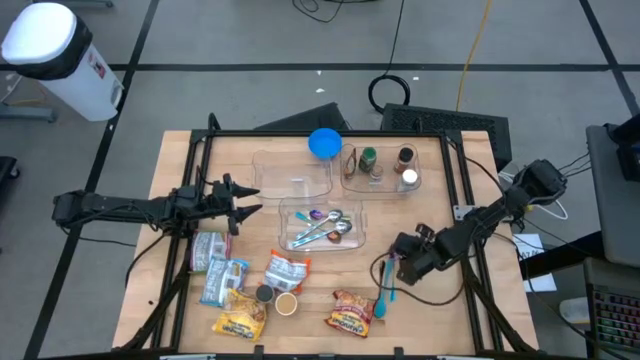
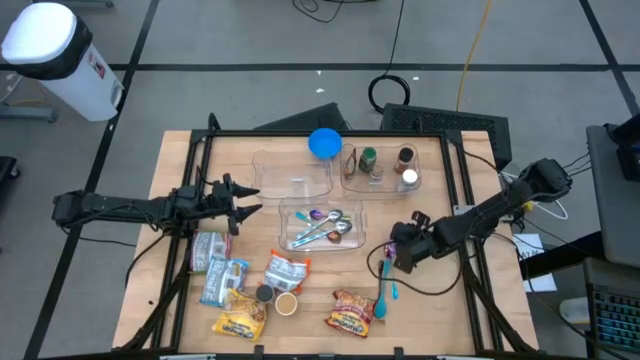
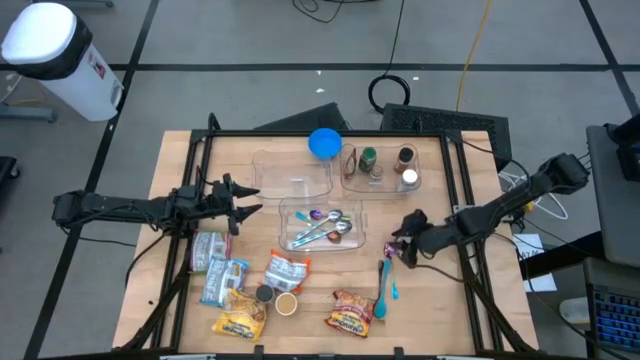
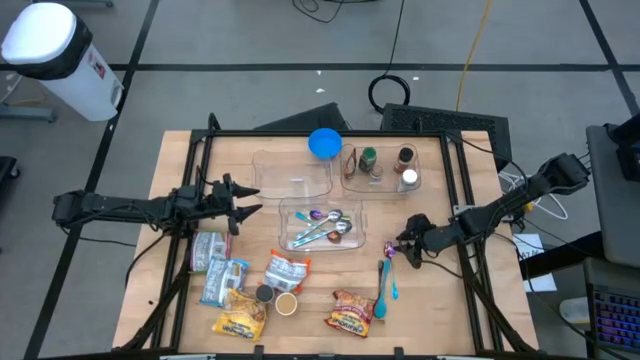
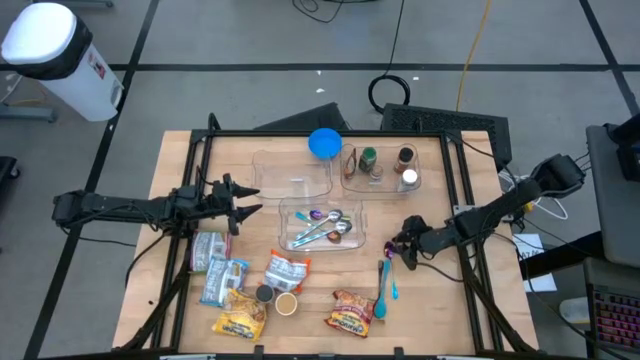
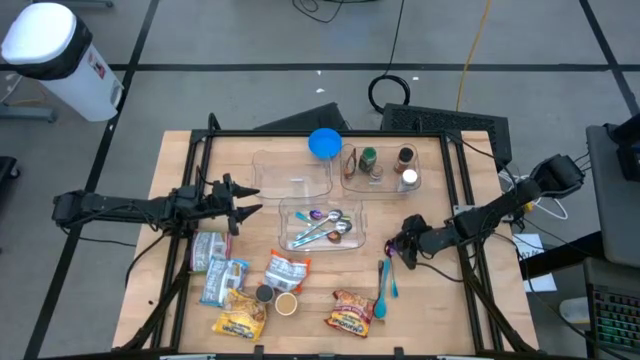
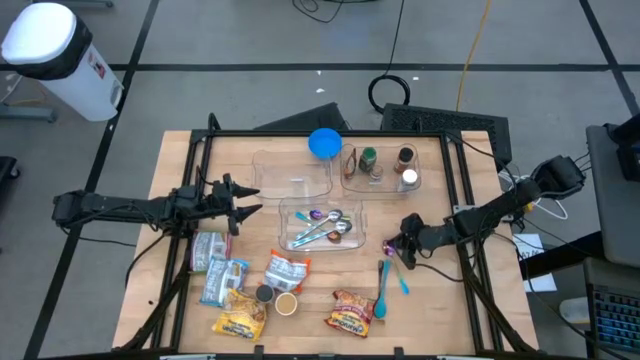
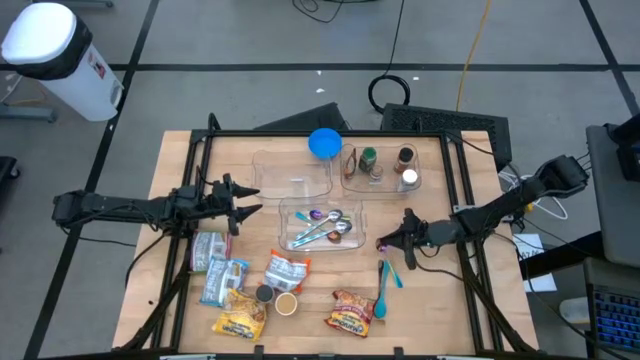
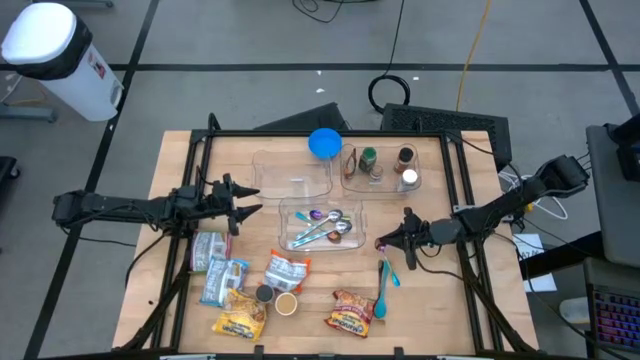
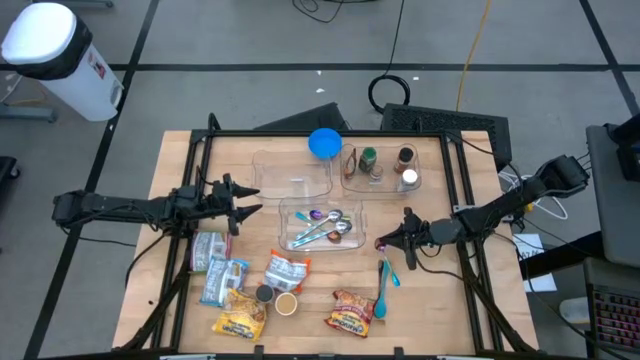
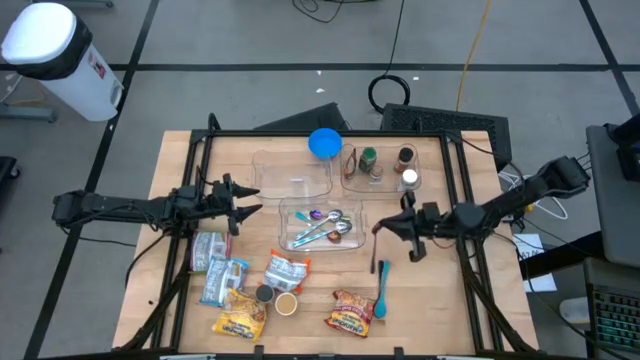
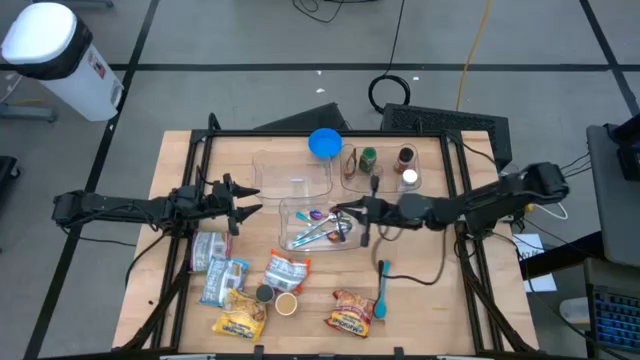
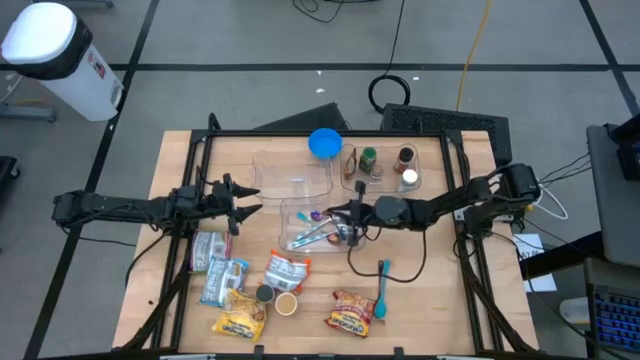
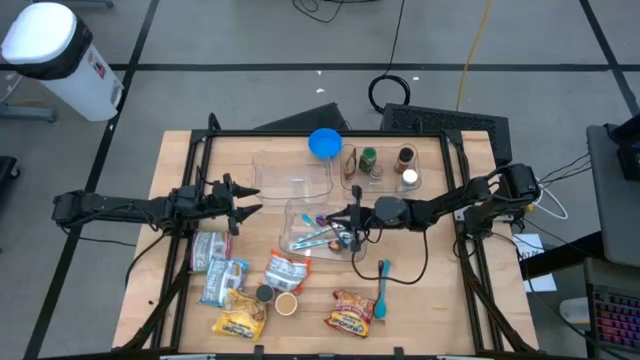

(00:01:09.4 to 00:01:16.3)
Task: Pick & Place Food Item
Put the green spoon into the bottom transparent bin

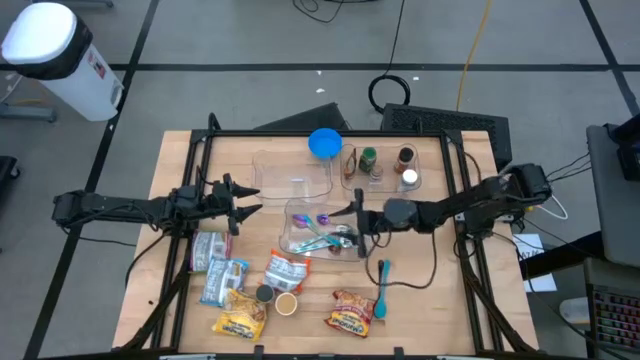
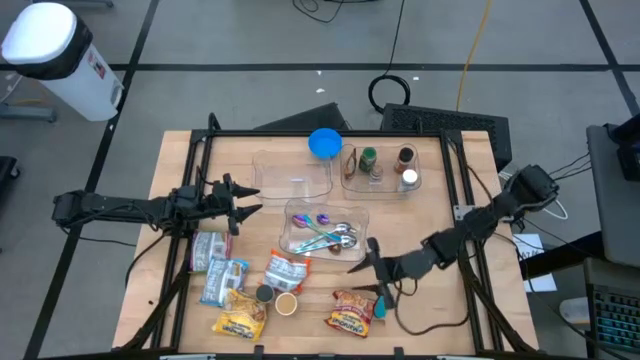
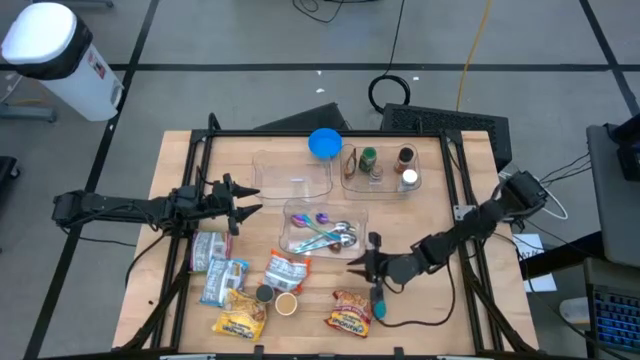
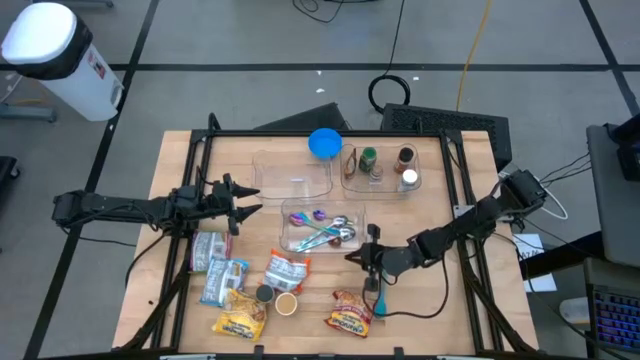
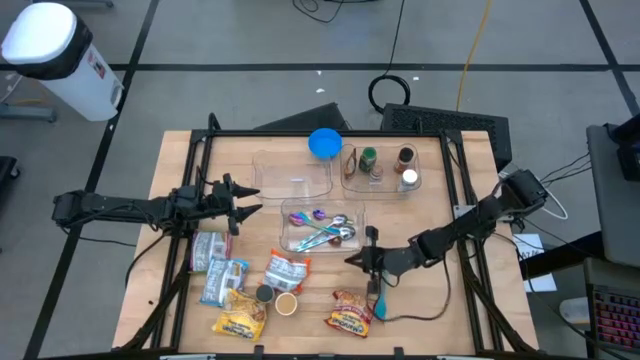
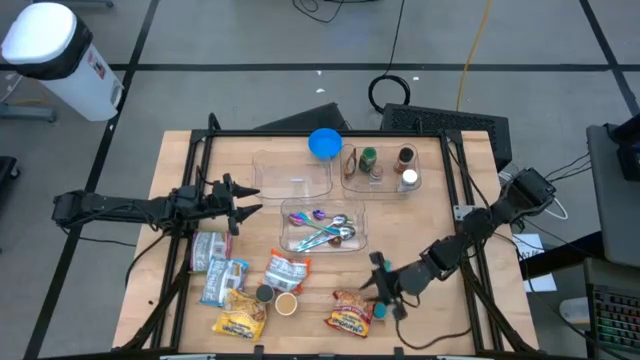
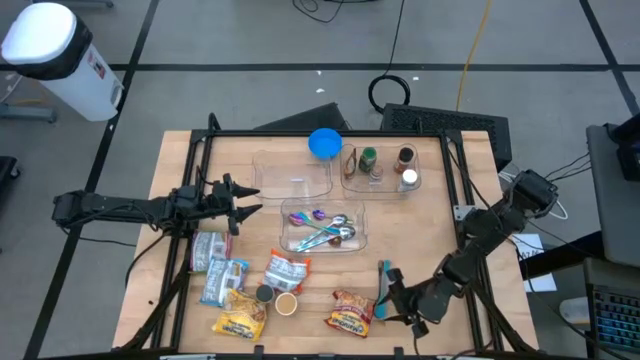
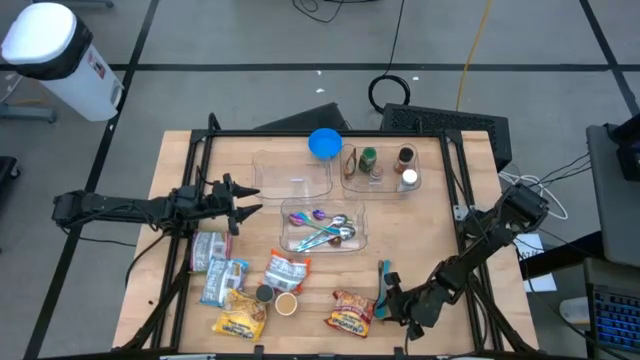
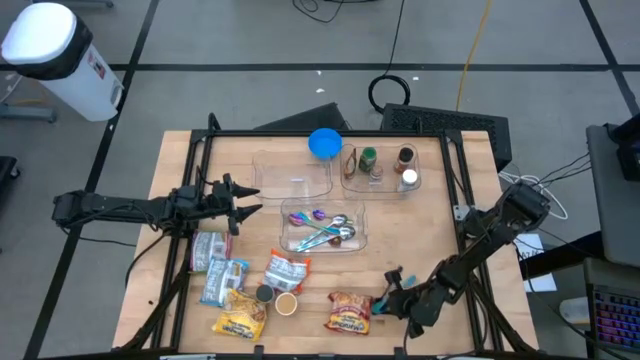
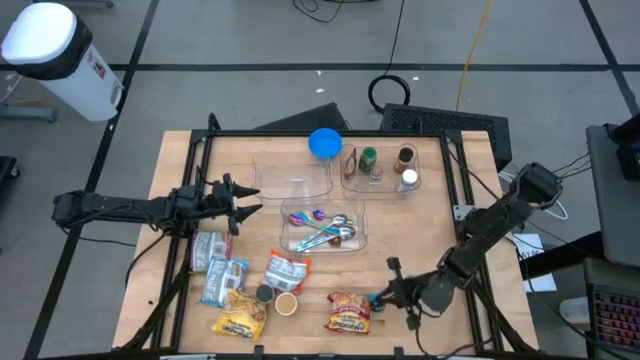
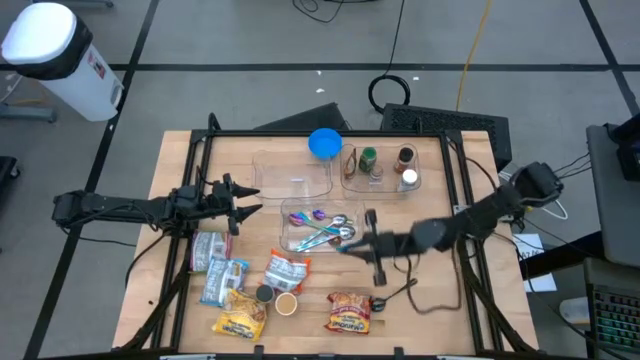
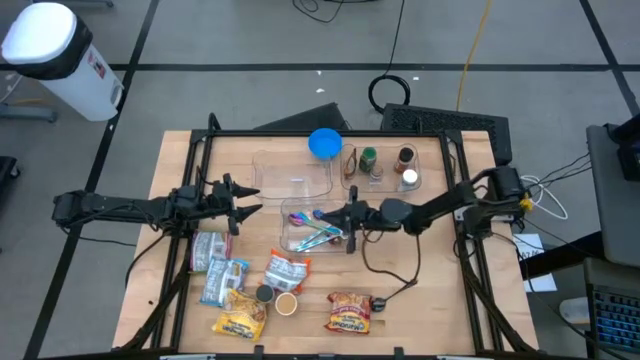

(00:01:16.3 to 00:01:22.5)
Put the blue spoon into the bottom transparent bin

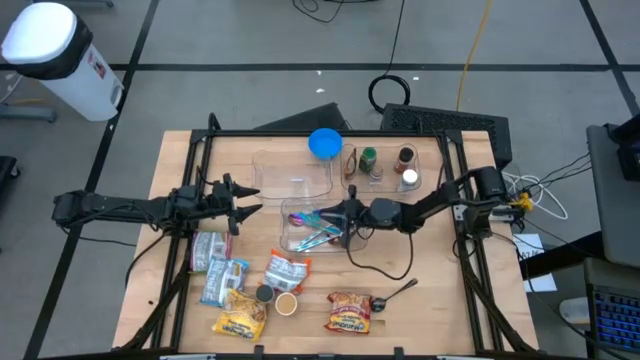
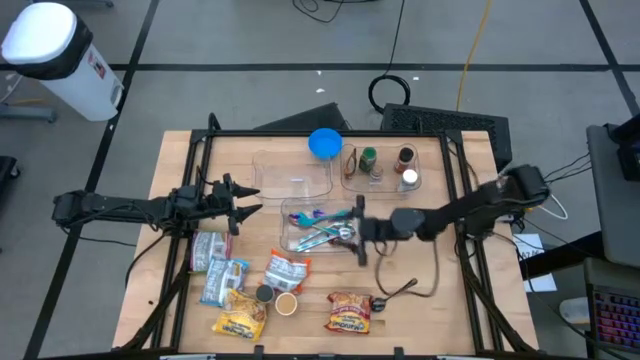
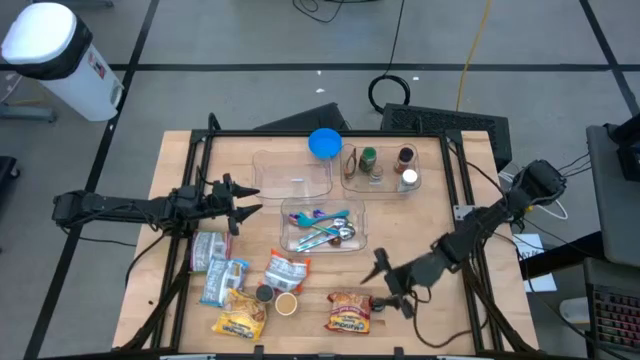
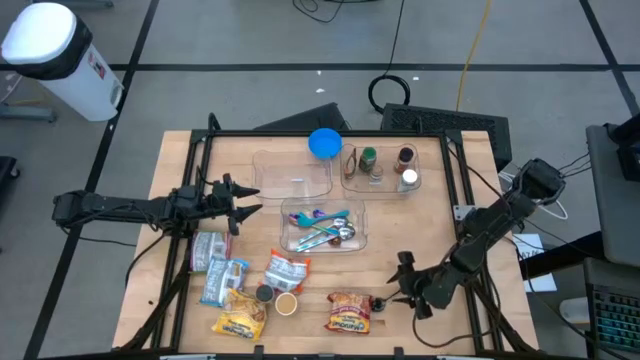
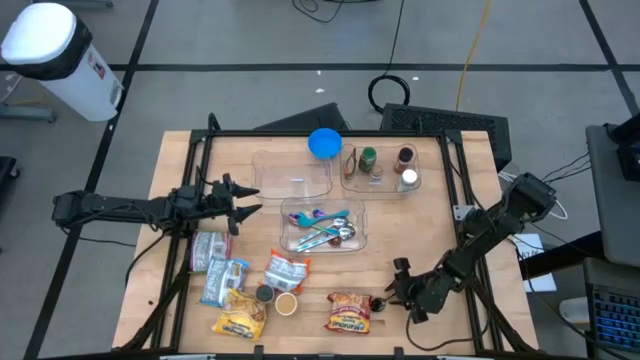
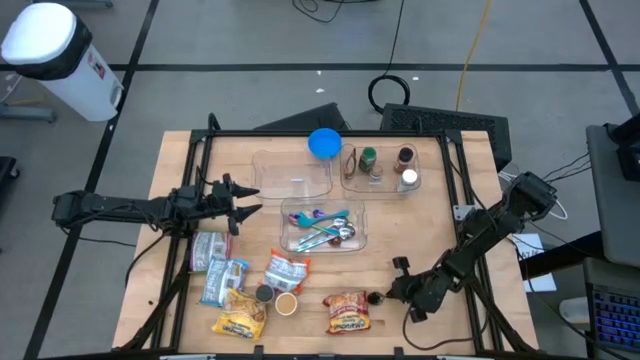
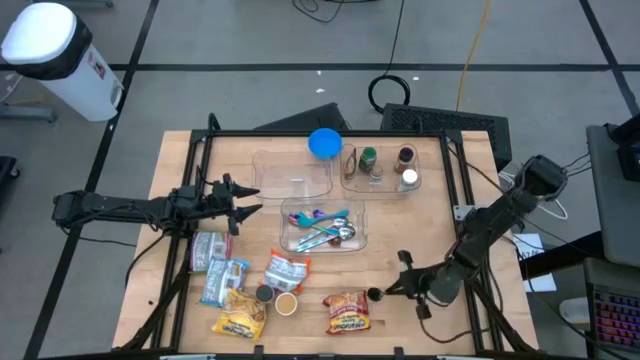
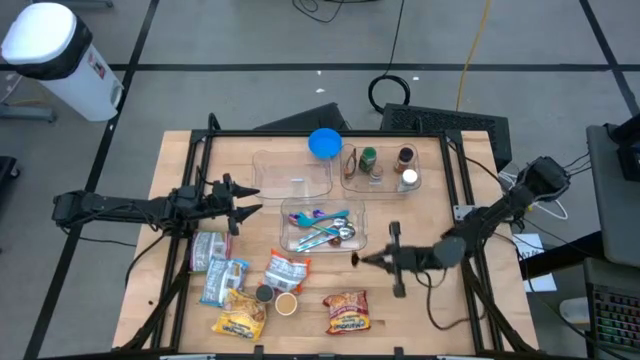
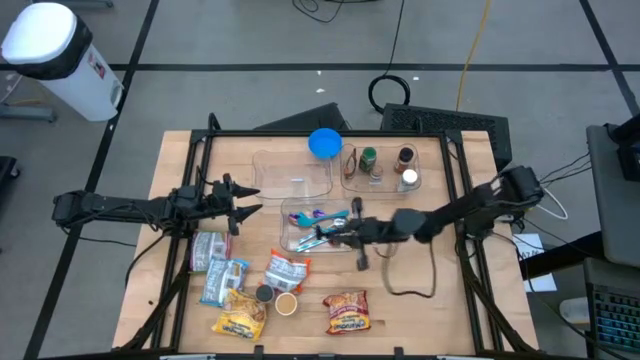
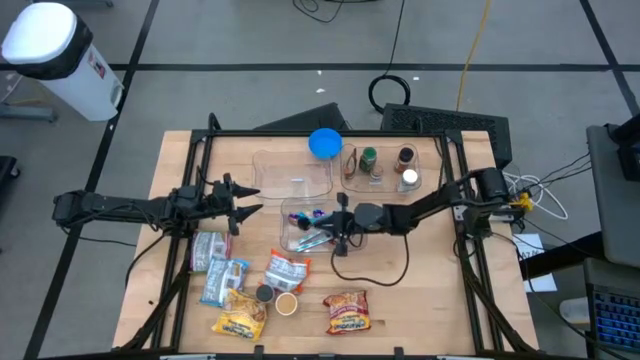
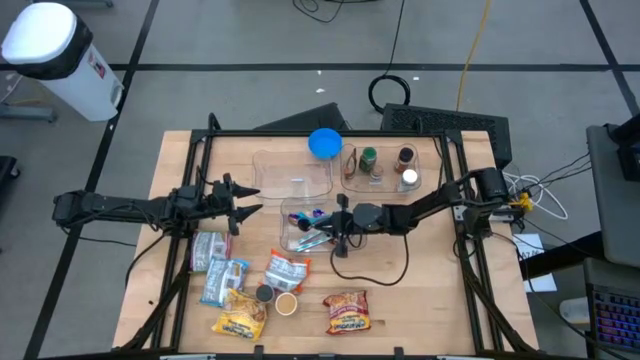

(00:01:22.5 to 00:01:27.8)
Put the black spoon into the bottom transparent bin

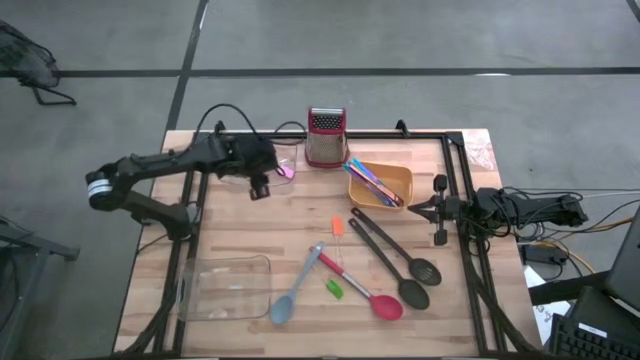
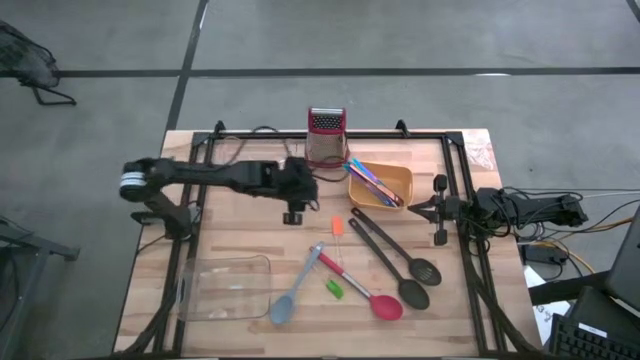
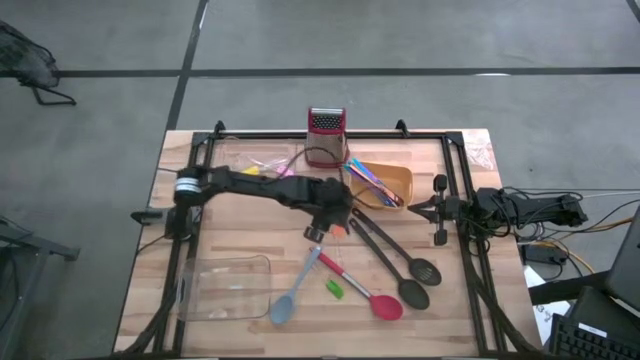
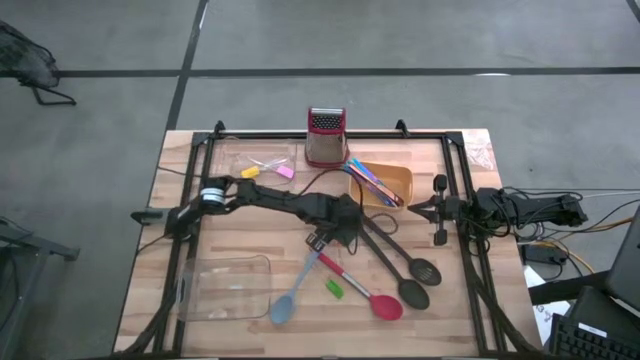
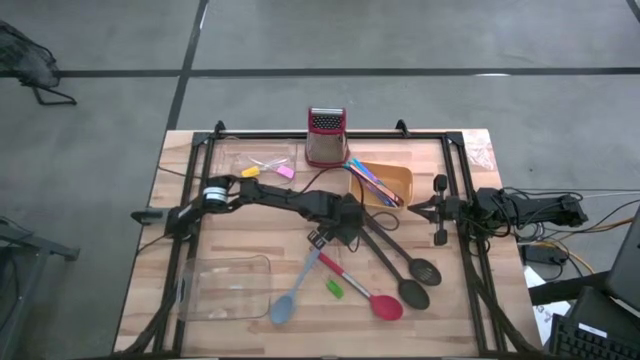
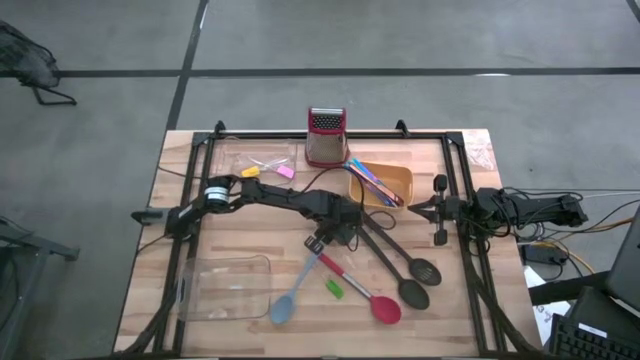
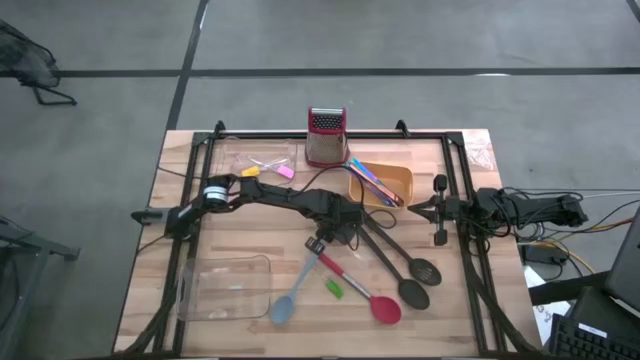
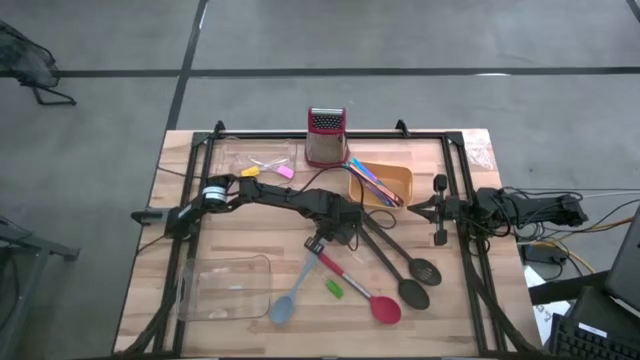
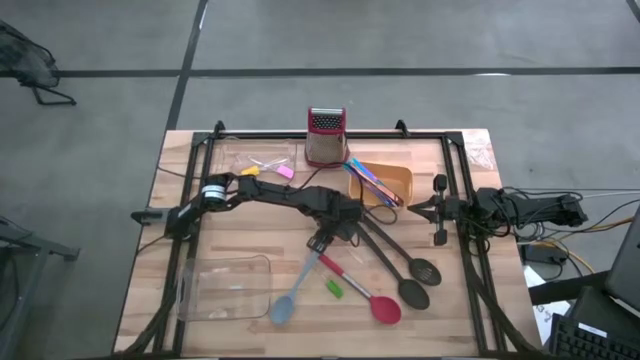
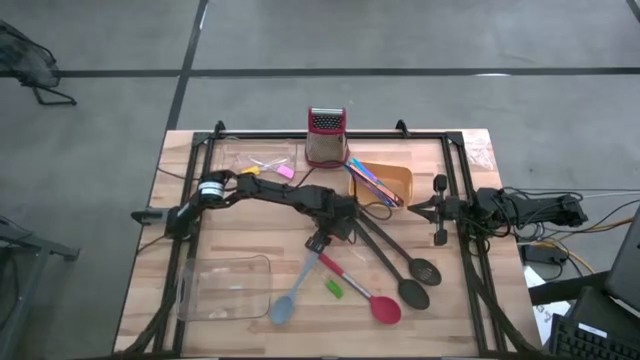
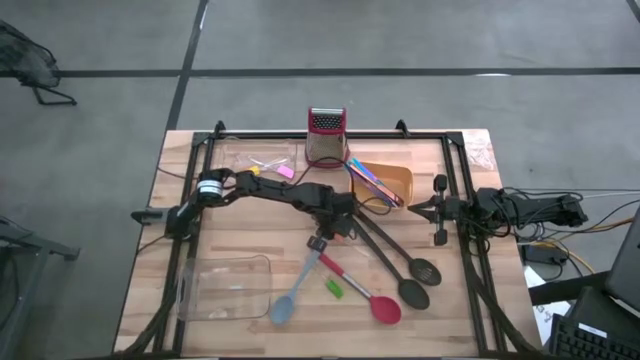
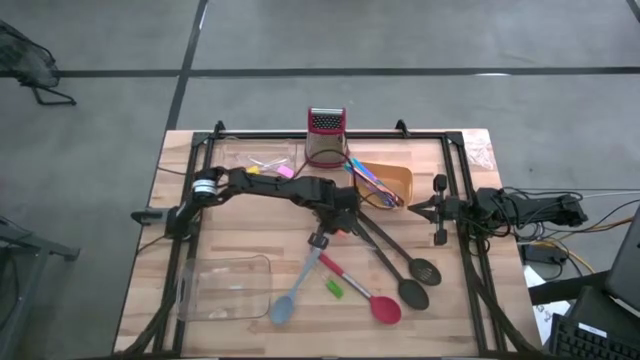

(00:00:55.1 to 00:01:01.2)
Task: Pick & Place Kitchen Items
Put the orange spatula into the top transparent bin
